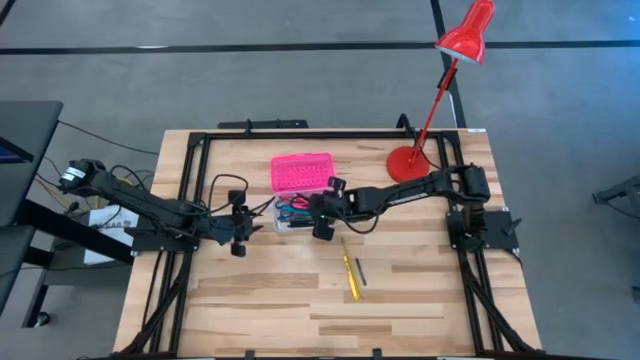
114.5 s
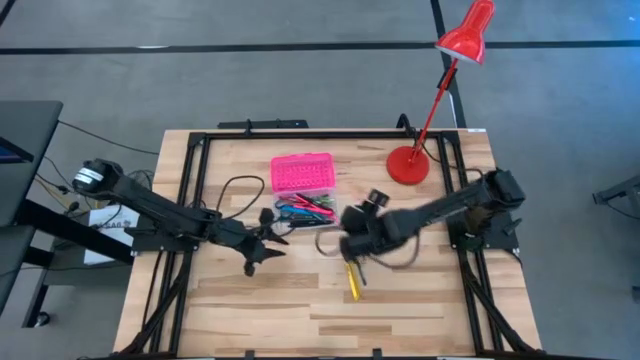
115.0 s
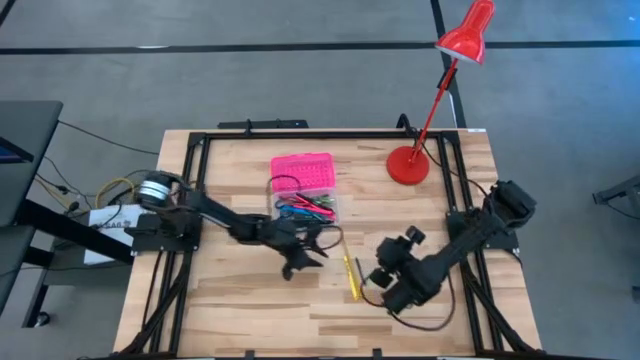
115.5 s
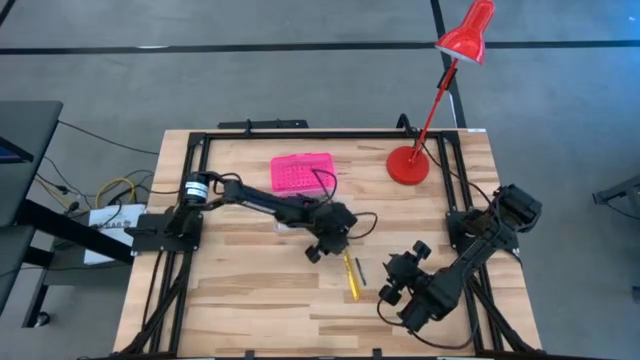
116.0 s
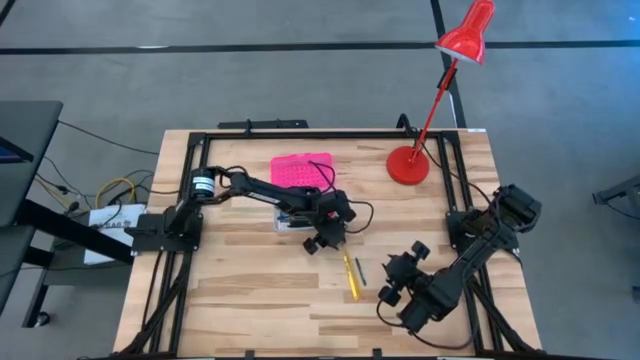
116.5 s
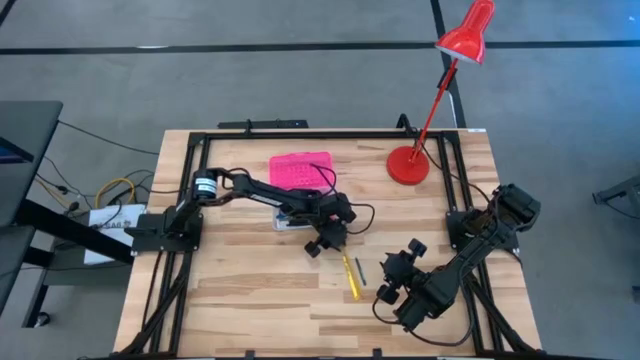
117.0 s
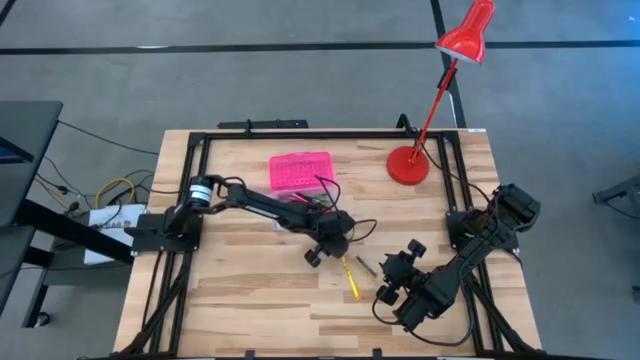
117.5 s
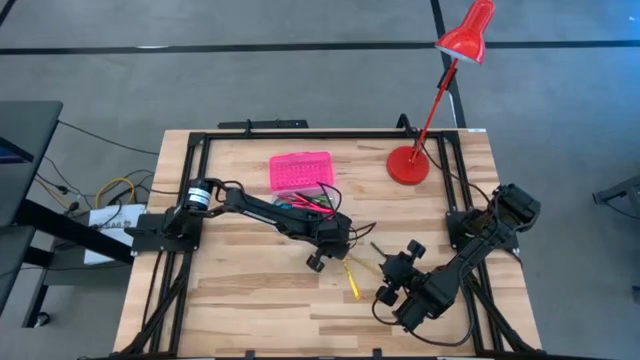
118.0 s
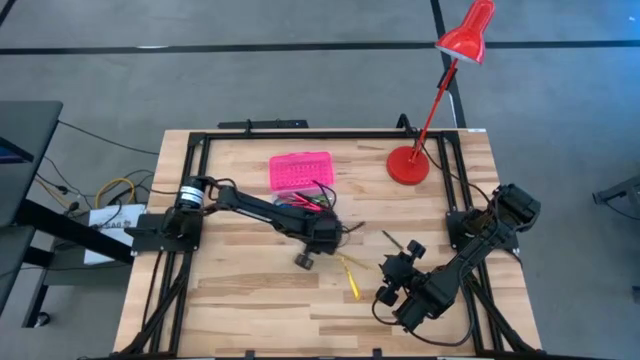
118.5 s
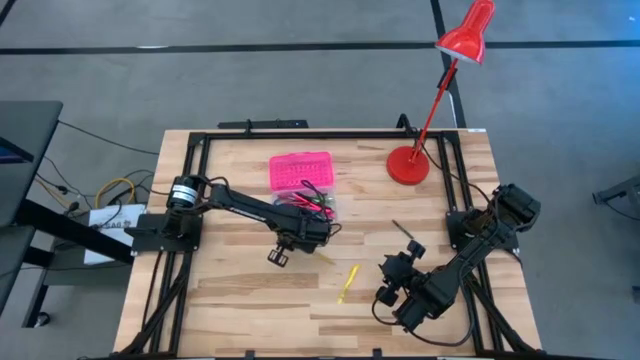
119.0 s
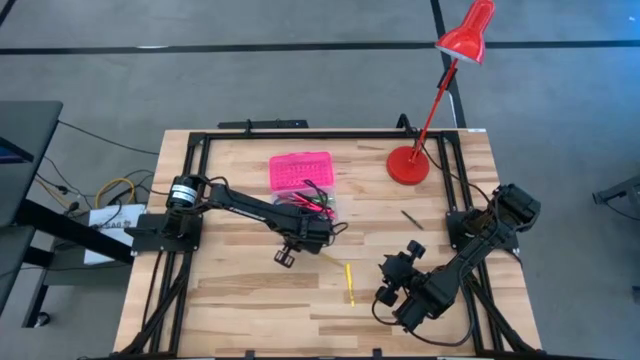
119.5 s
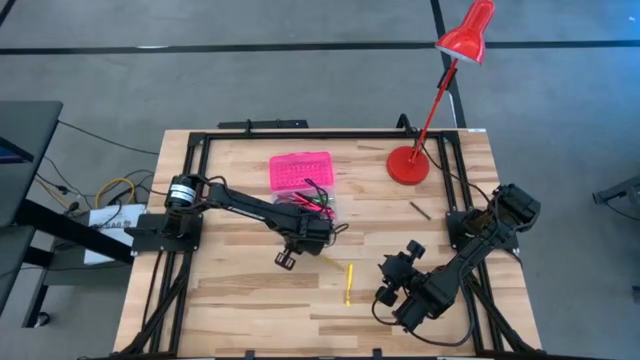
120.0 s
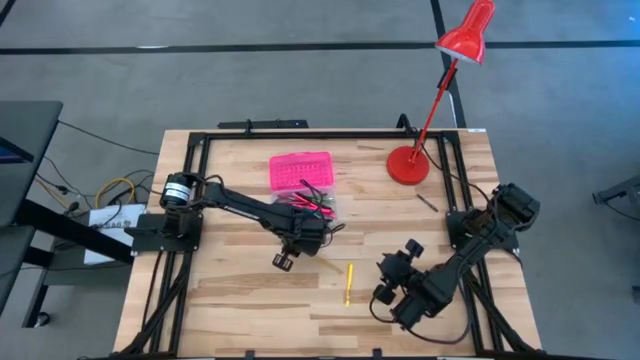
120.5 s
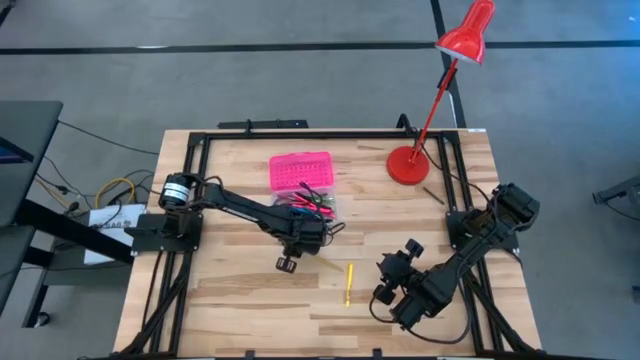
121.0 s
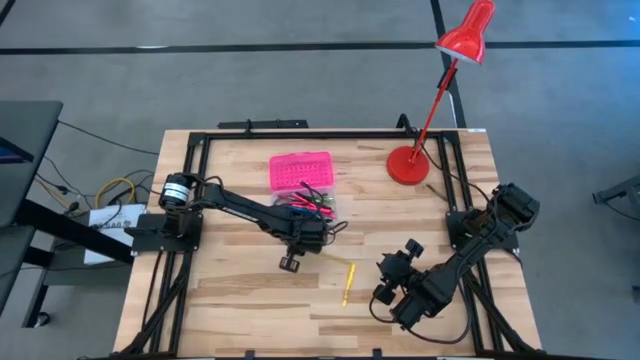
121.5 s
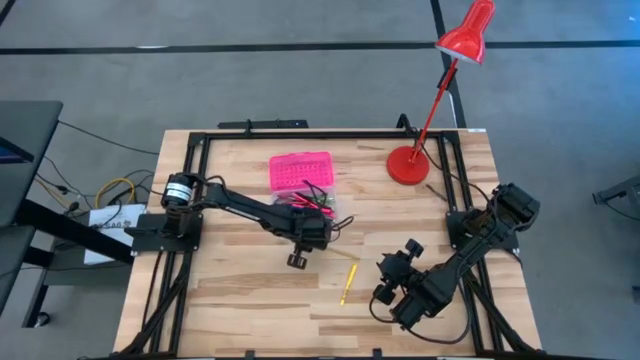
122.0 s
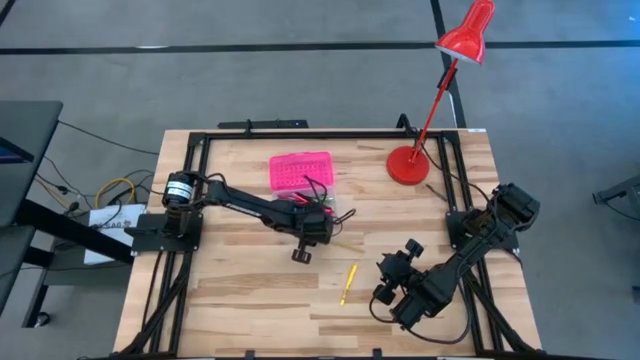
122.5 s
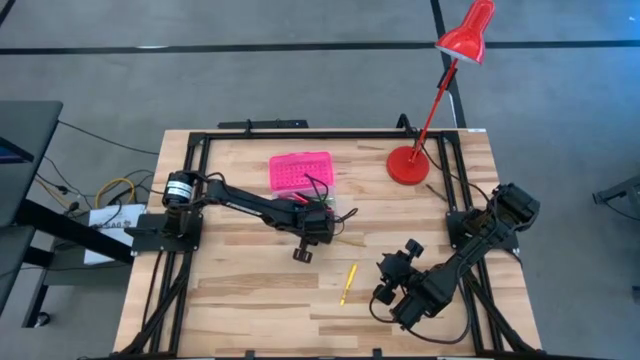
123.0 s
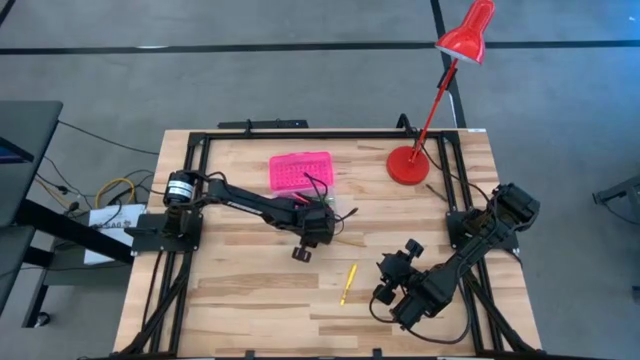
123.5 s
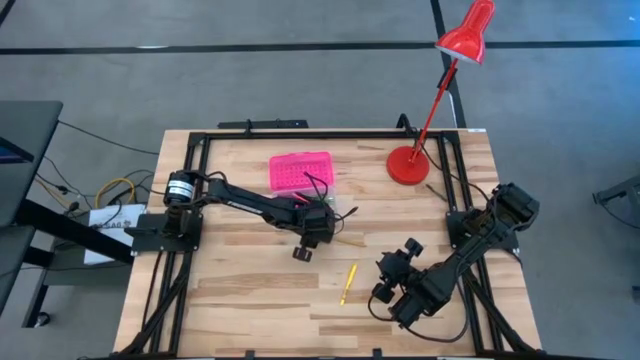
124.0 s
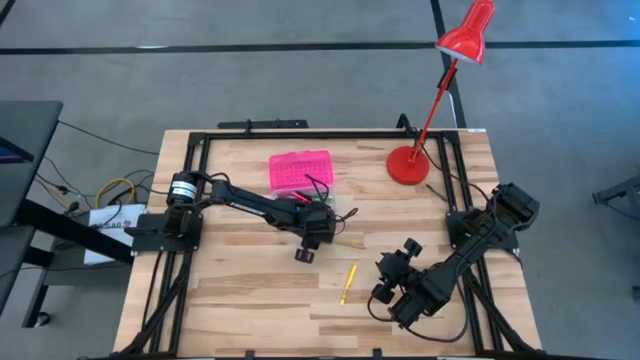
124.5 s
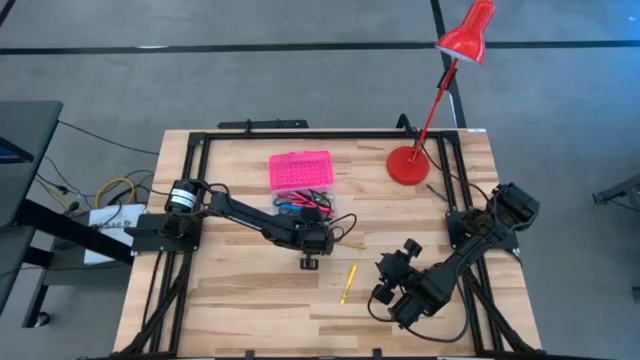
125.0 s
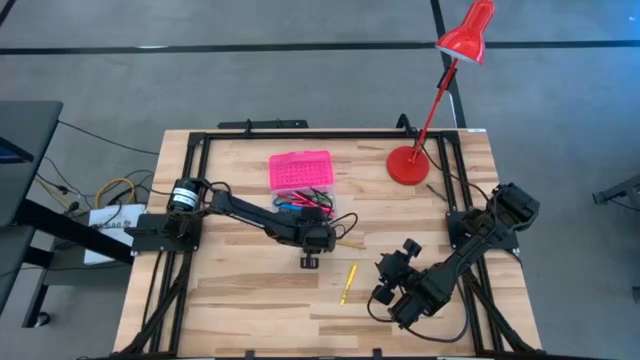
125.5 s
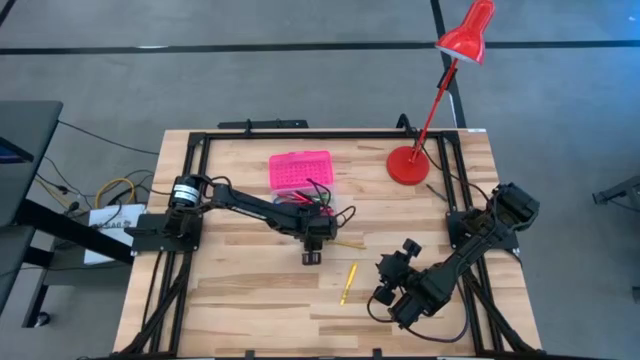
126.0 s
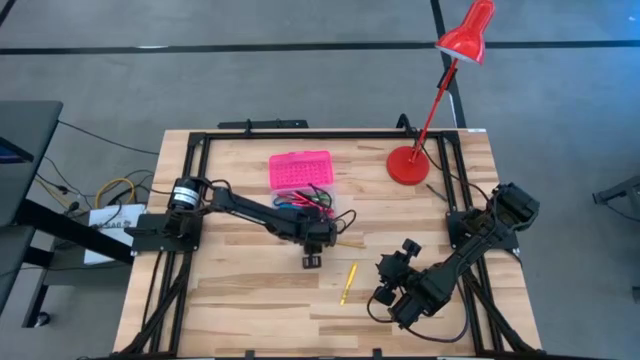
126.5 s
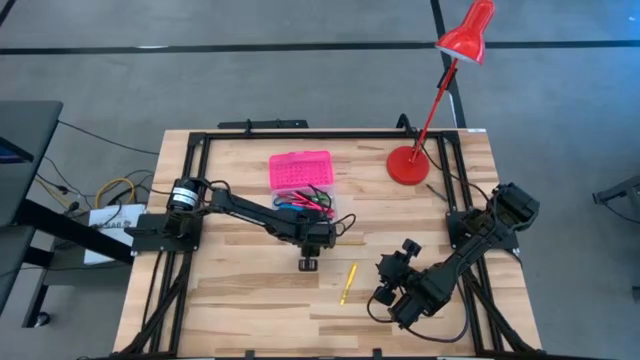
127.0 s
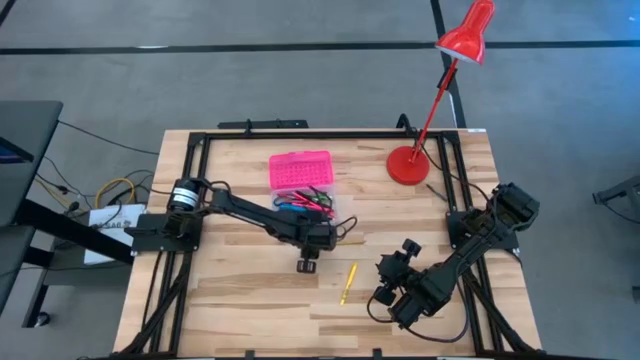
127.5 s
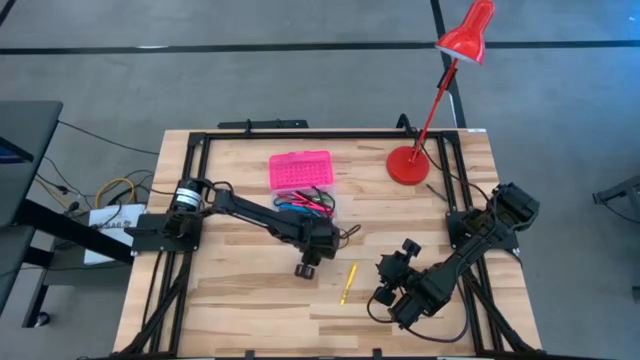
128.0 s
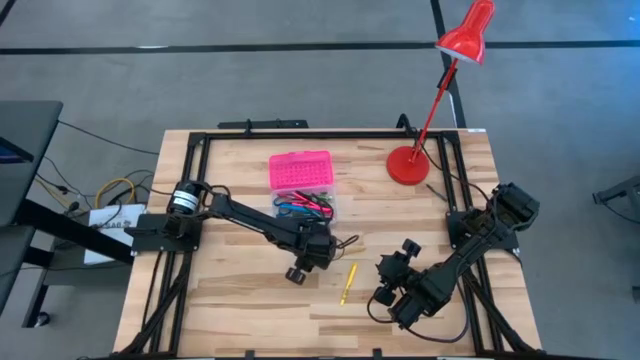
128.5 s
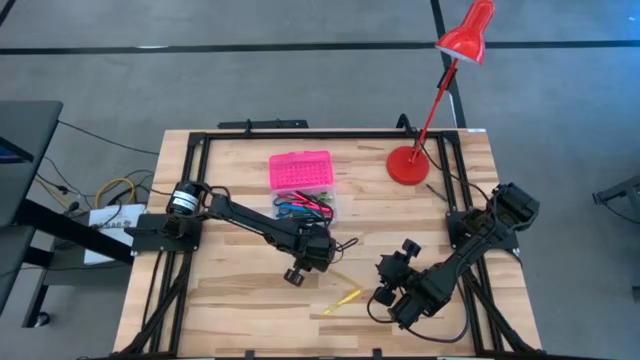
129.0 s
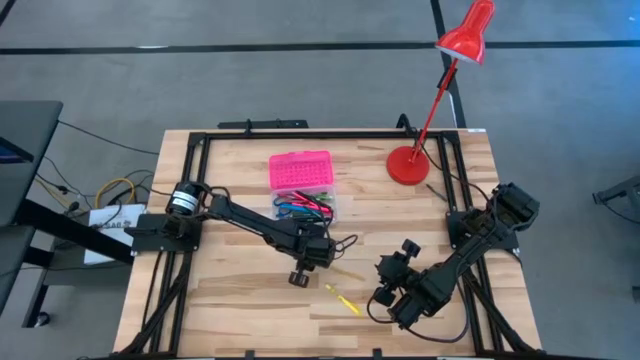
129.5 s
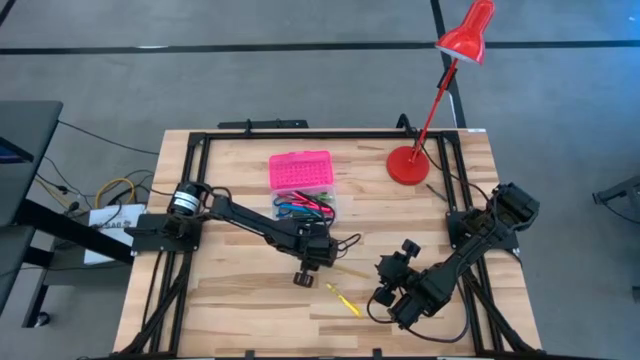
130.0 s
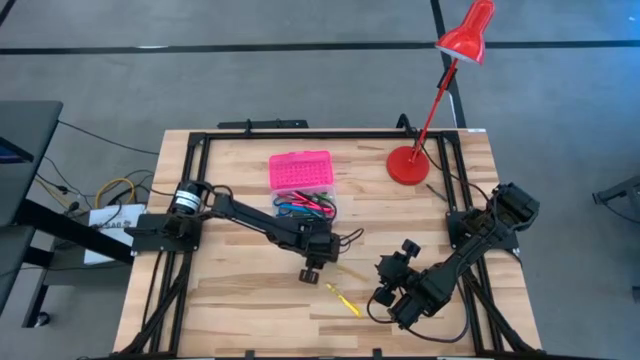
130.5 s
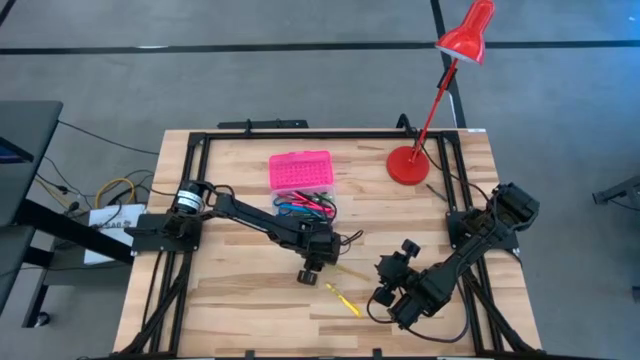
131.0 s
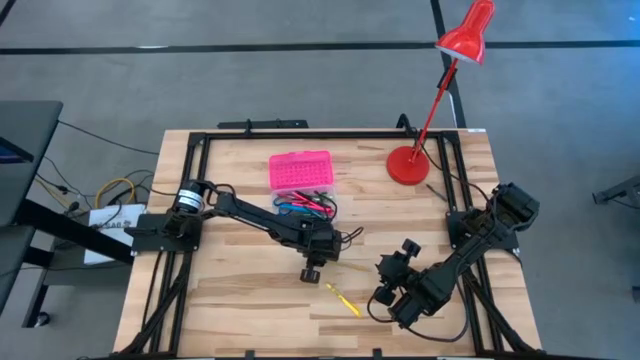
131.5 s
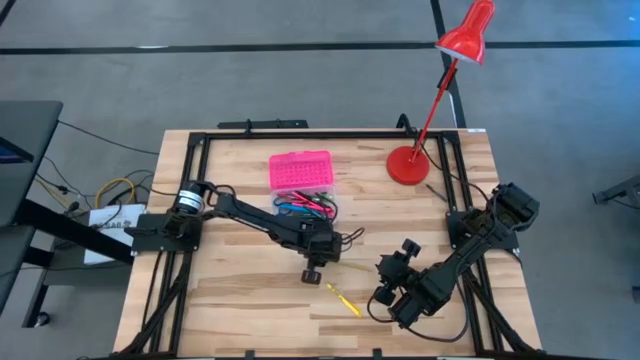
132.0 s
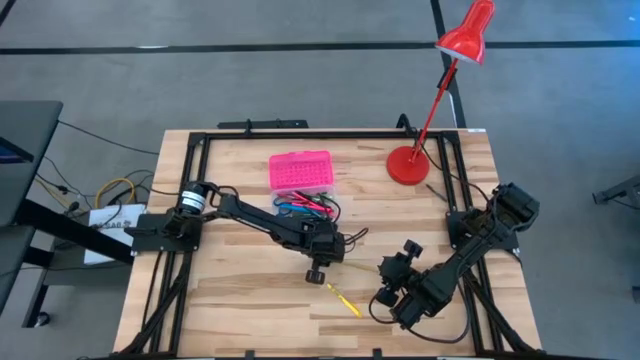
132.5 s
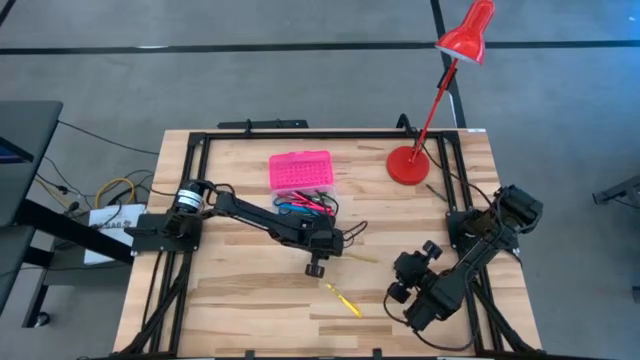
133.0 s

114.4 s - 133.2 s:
Task: Pick & place school supplies into a supply box
Put the yellow pencil into the pink supply box
